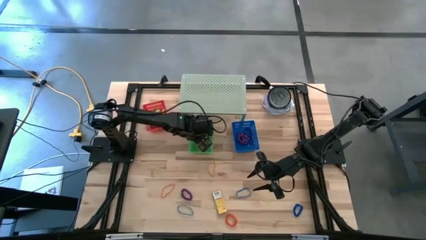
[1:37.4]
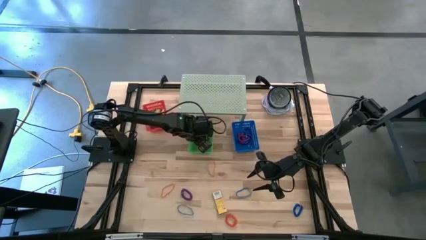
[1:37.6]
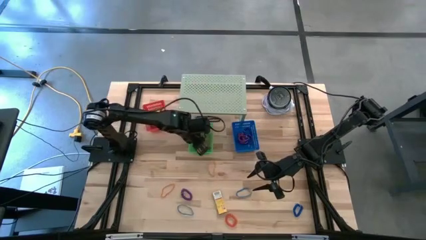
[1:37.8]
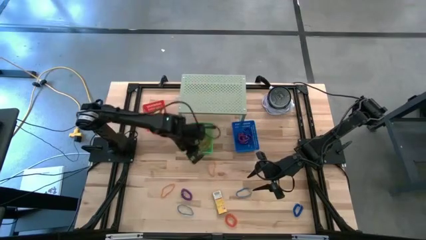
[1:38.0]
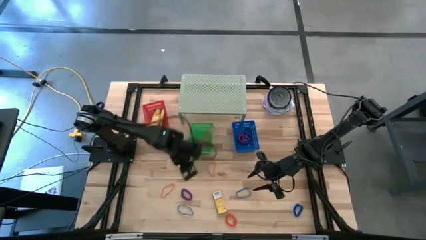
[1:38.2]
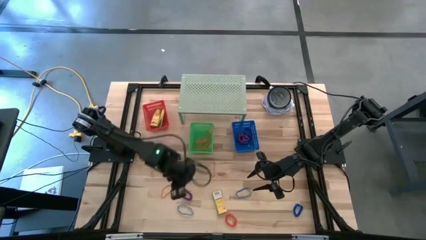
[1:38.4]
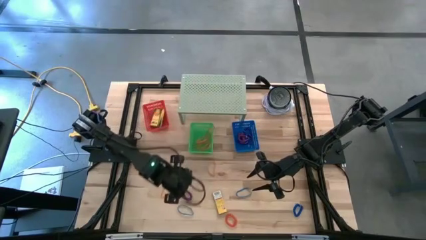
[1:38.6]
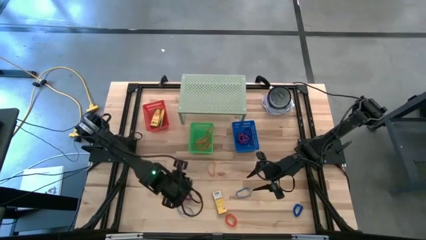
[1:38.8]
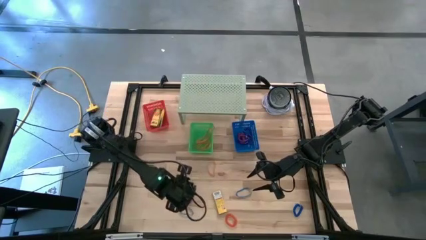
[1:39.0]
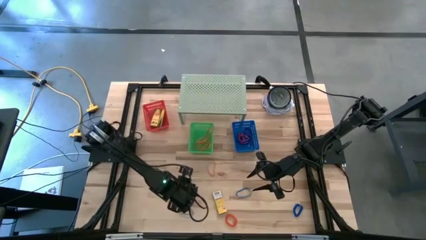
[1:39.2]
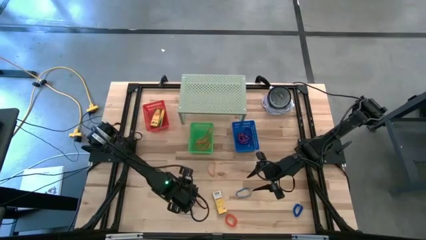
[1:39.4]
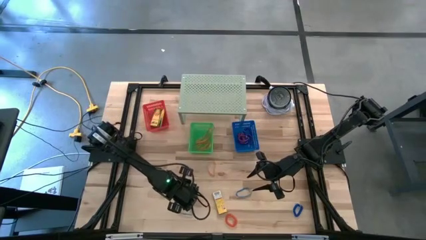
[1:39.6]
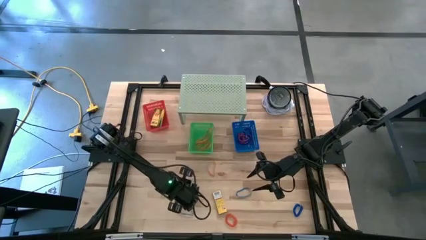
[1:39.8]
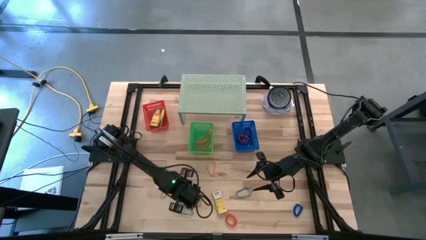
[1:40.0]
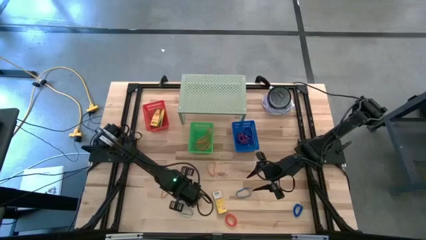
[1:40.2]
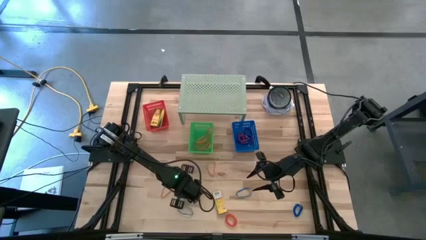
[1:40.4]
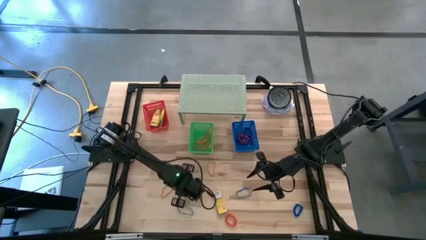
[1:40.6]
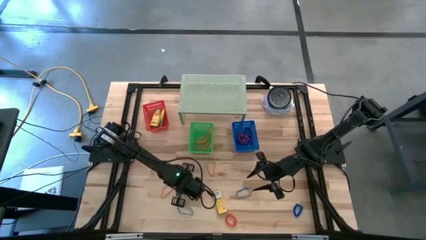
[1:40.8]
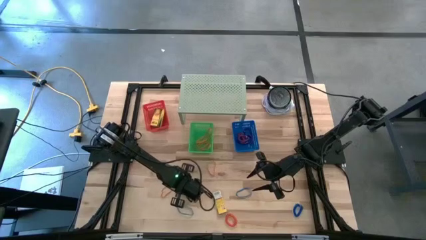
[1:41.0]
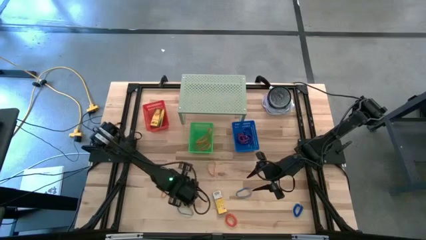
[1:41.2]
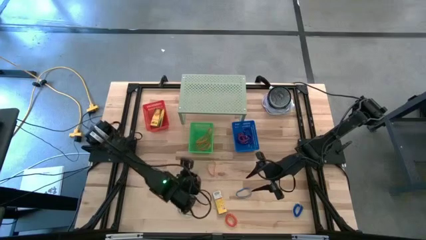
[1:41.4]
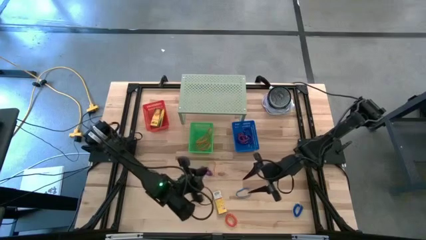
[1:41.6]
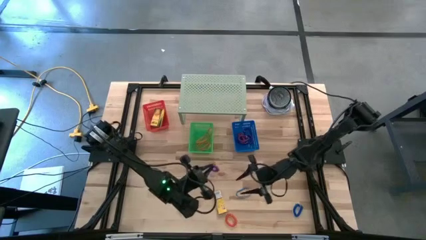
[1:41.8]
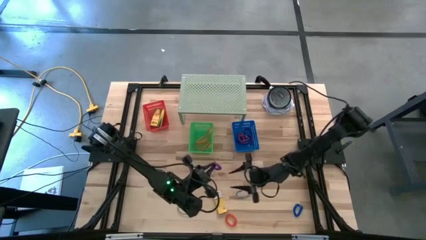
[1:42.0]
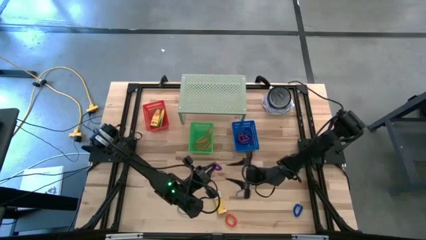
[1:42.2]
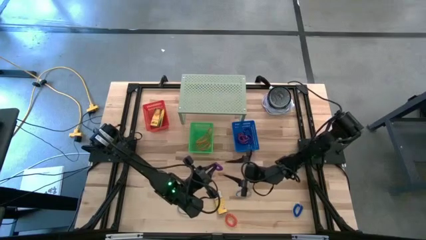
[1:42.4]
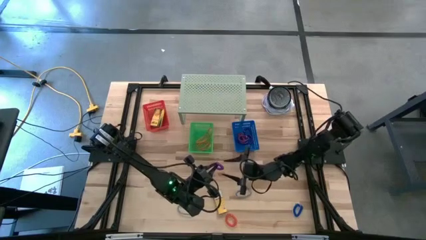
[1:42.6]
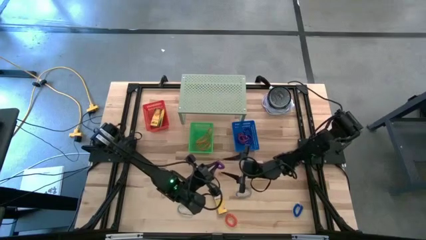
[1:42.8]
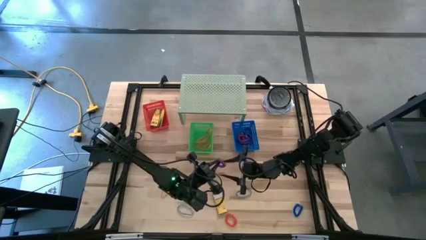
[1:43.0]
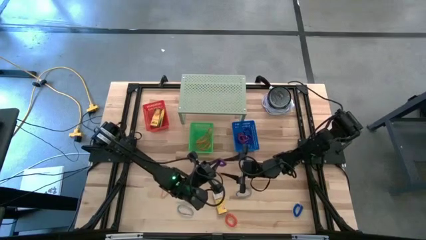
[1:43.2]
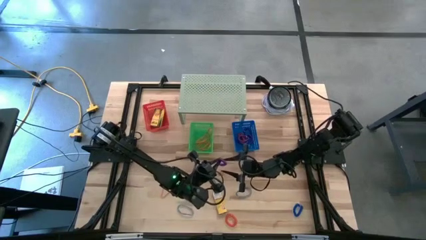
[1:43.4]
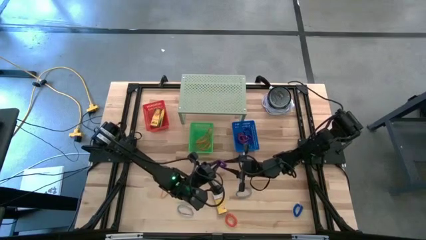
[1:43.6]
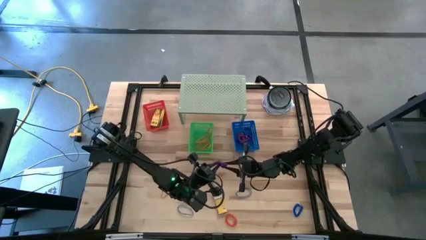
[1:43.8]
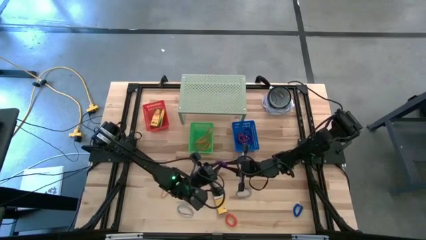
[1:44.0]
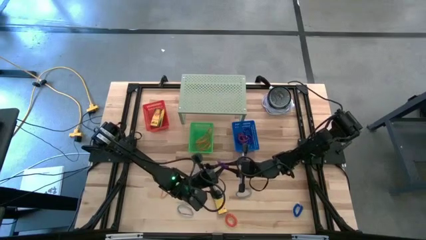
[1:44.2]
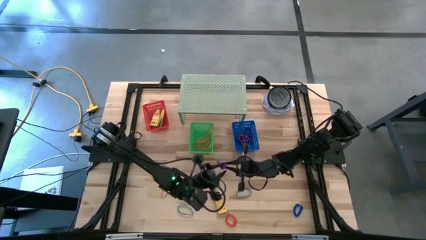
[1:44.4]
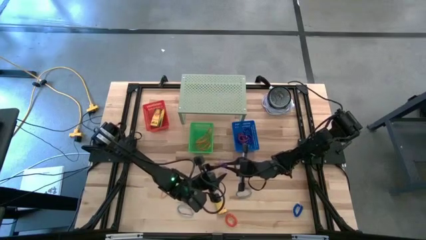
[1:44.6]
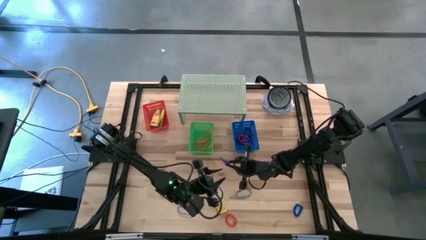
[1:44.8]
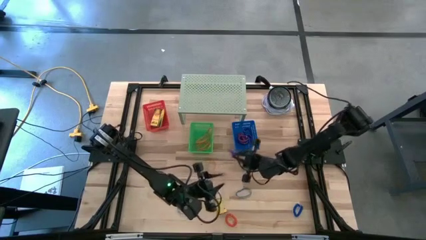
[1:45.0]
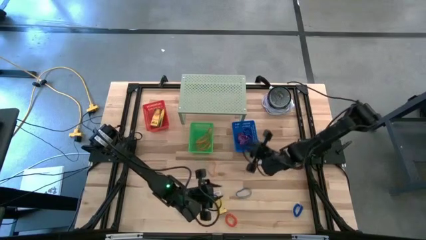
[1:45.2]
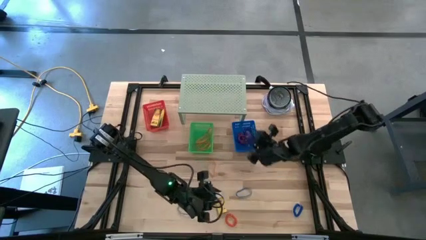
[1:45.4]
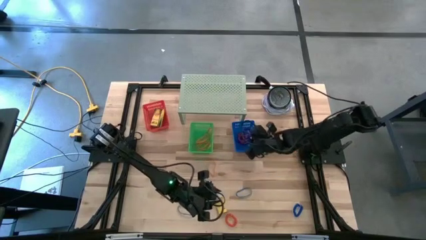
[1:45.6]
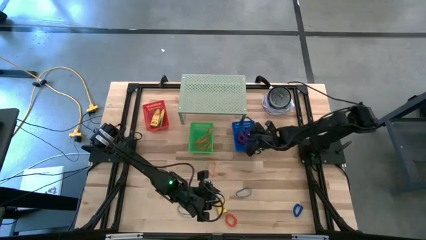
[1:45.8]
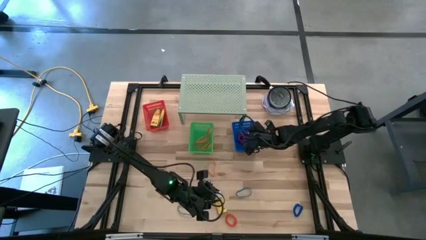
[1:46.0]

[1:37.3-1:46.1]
Task: Pick & Place Office Desk Supplies
Put the violet spring keychain into the blue bin

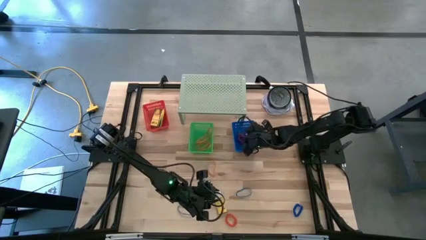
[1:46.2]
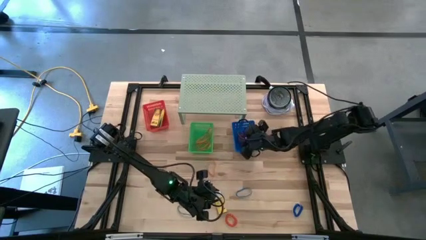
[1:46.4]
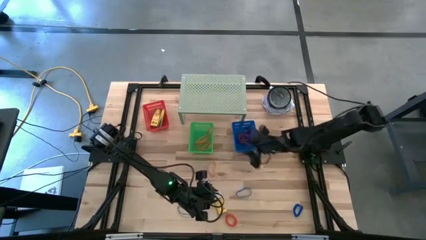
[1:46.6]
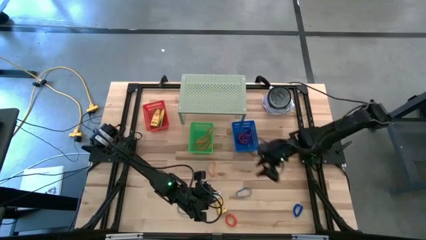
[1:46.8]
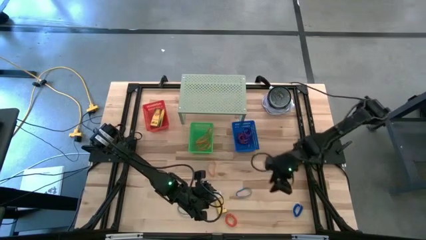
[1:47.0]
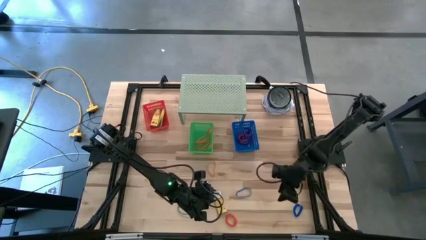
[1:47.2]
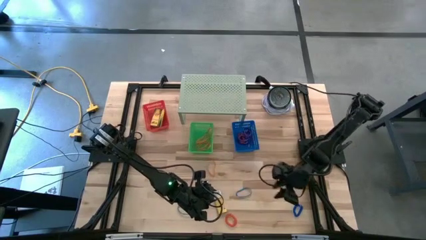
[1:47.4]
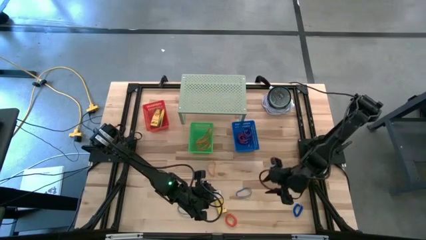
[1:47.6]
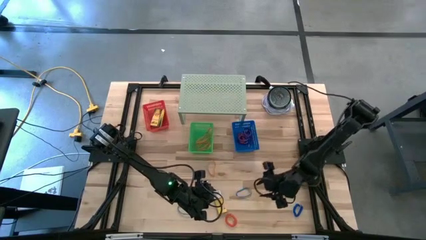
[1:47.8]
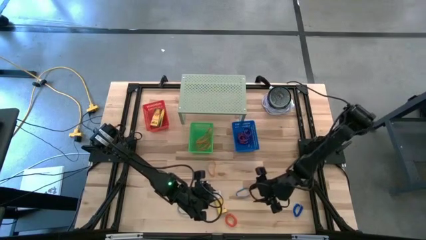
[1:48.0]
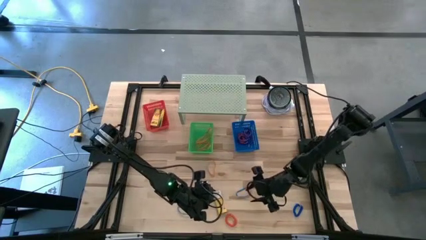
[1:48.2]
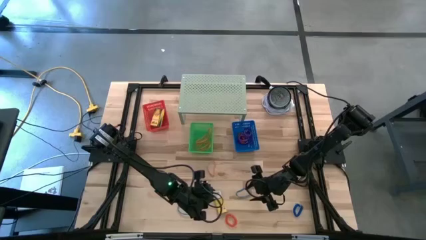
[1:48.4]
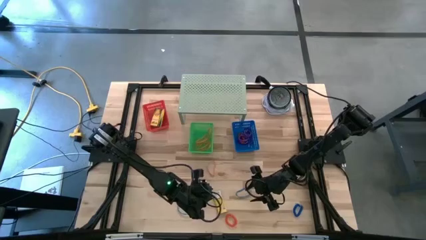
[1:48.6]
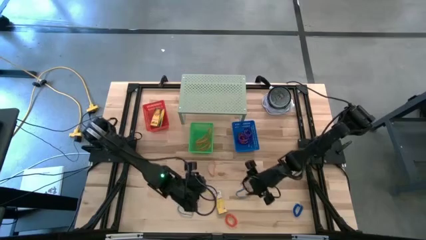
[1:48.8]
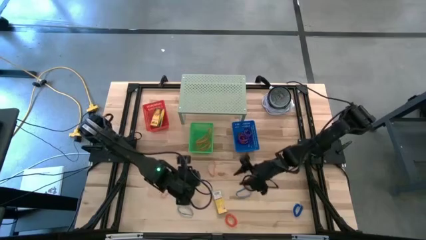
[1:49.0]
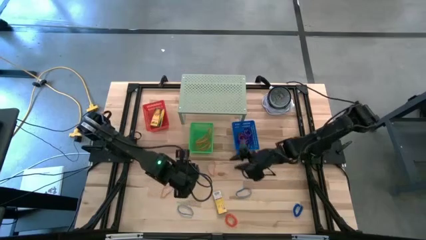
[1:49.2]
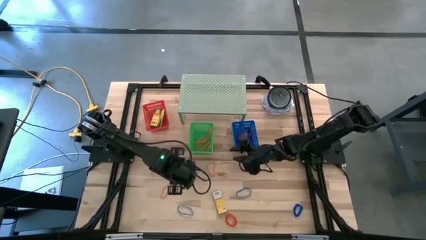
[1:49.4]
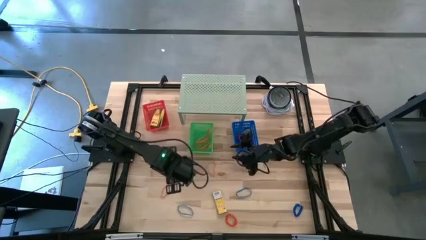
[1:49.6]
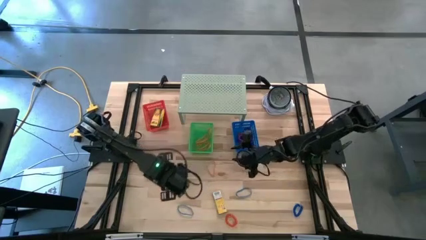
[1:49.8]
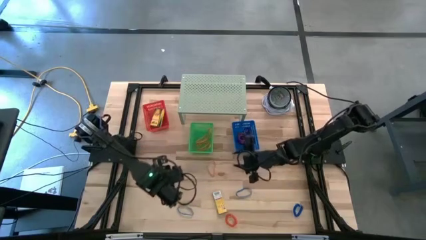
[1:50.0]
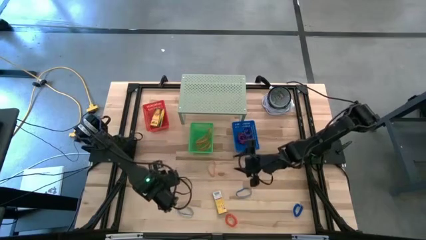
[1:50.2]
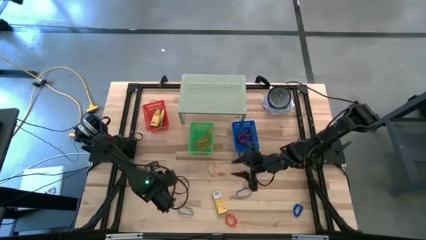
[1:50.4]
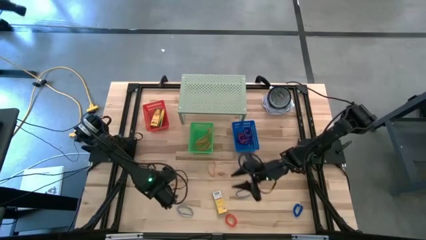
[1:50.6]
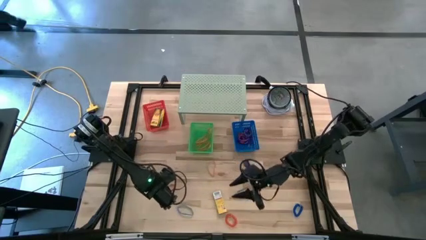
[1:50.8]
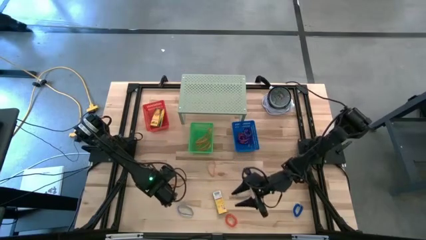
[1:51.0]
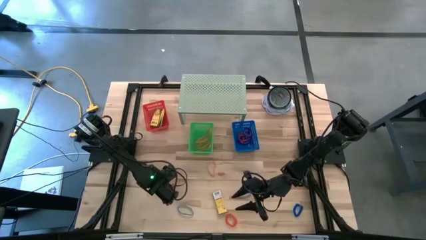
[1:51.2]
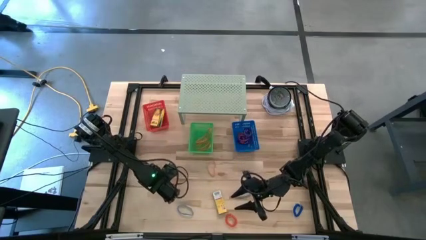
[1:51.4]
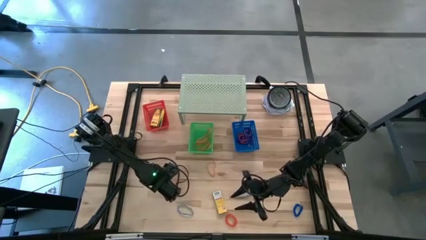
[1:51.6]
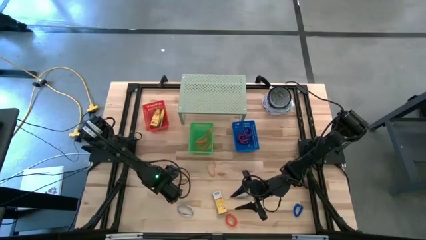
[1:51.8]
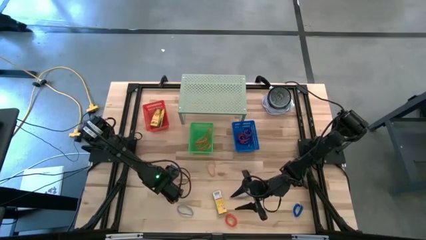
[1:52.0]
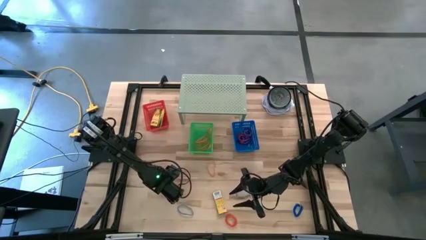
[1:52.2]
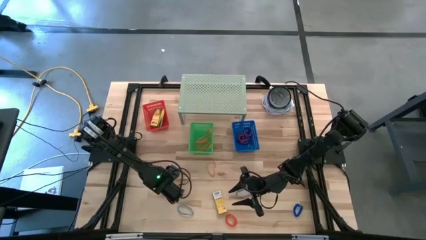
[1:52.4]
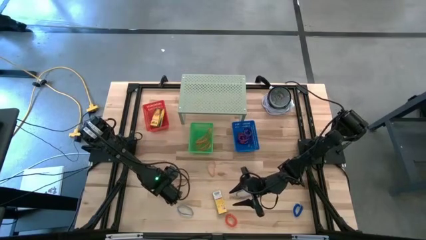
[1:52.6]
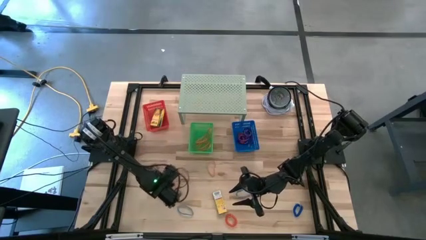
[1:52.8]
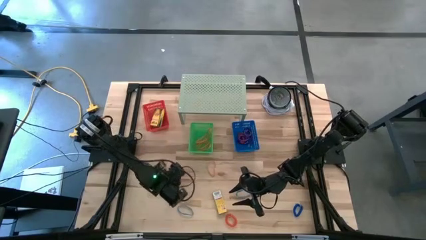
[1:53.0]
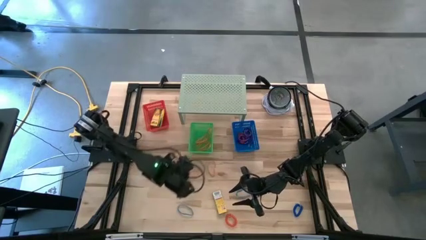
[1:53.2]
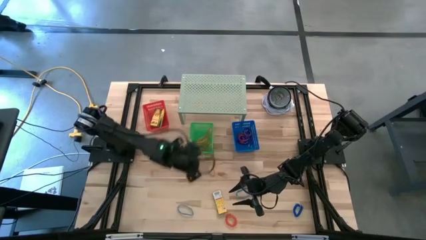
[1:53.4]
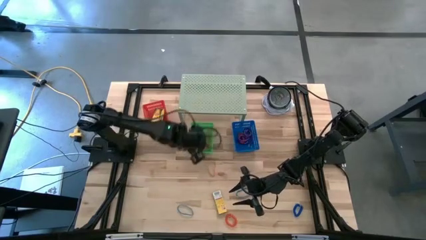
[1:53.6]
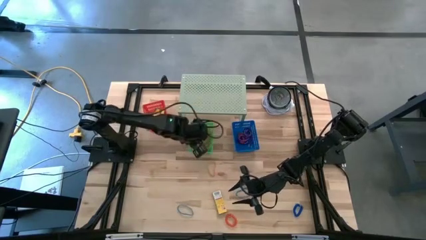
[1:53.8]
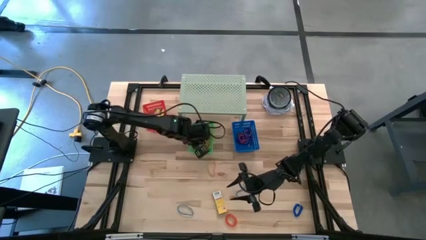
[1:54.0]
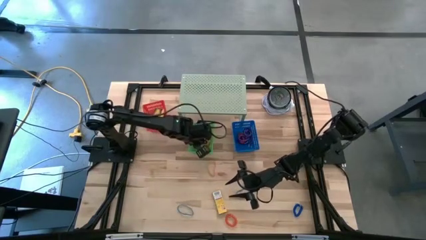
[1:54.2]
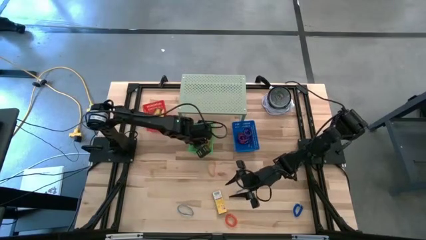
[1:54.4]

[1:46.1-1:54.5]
Put the orange rubber band into the green bin
